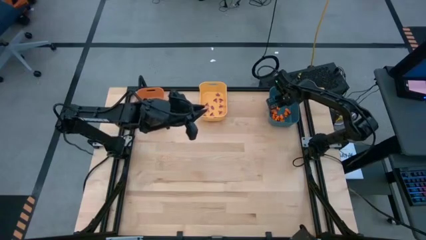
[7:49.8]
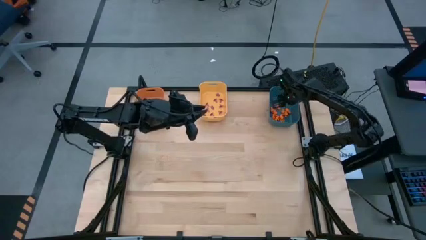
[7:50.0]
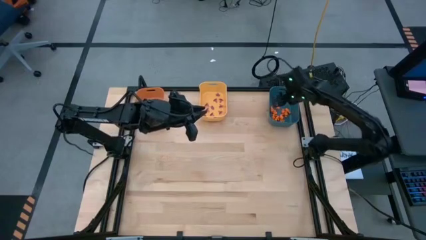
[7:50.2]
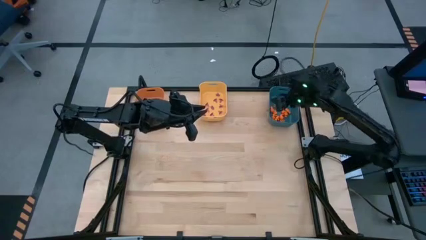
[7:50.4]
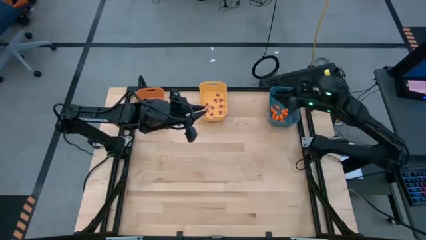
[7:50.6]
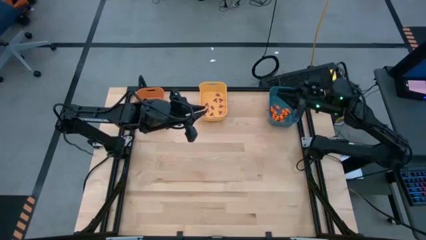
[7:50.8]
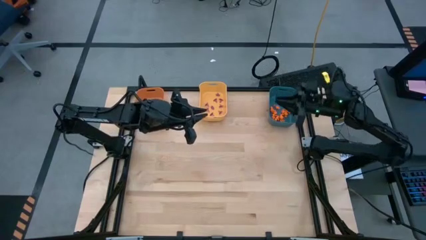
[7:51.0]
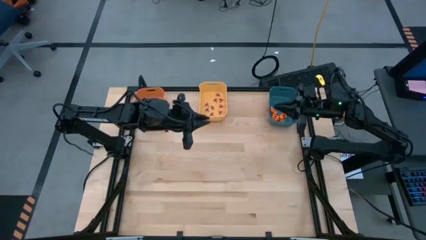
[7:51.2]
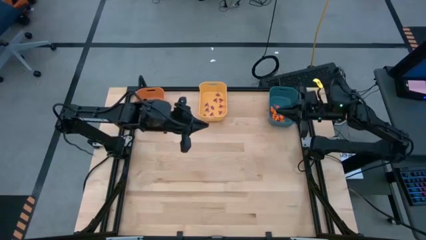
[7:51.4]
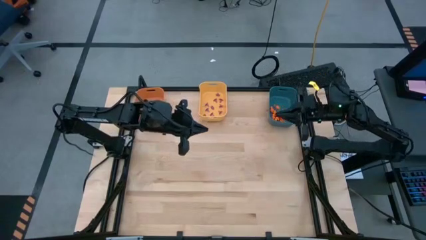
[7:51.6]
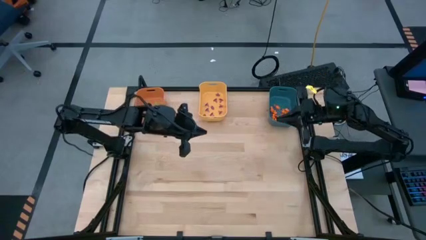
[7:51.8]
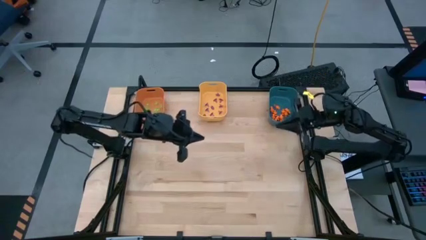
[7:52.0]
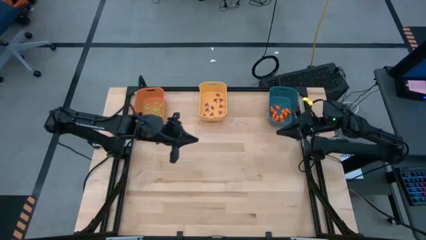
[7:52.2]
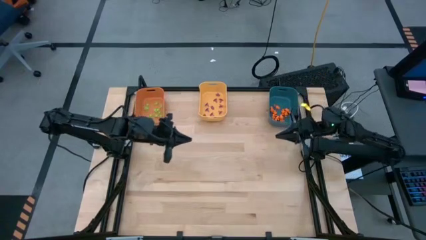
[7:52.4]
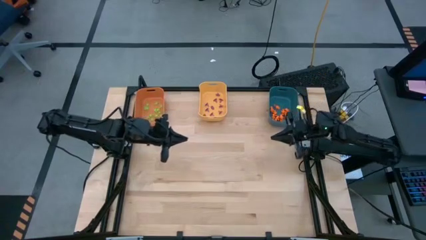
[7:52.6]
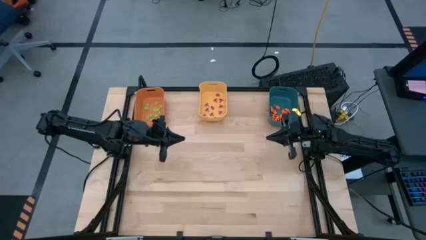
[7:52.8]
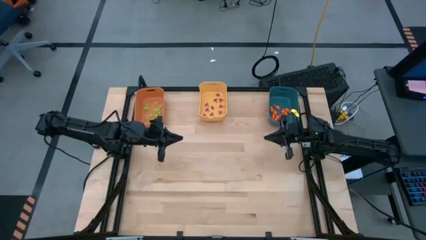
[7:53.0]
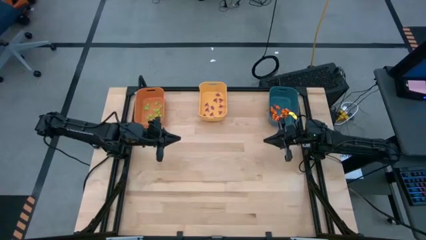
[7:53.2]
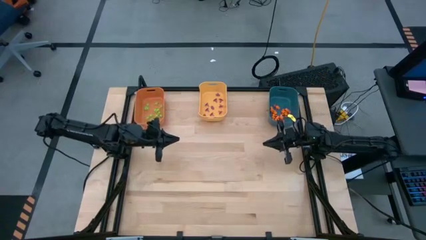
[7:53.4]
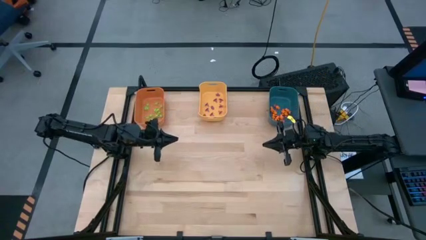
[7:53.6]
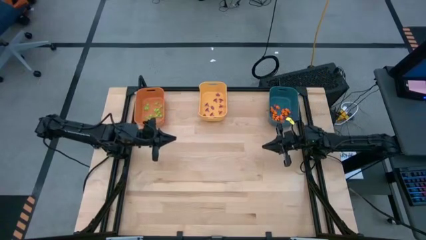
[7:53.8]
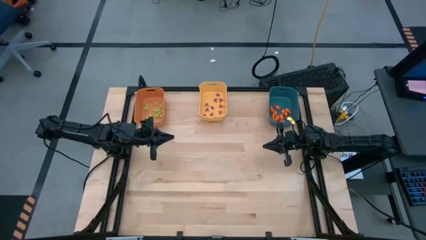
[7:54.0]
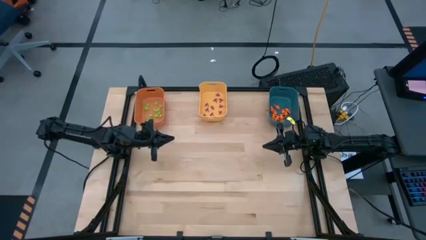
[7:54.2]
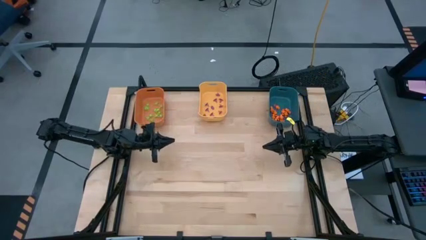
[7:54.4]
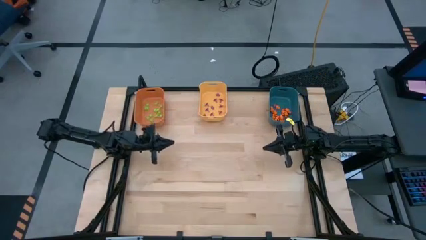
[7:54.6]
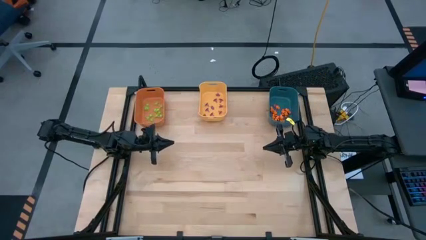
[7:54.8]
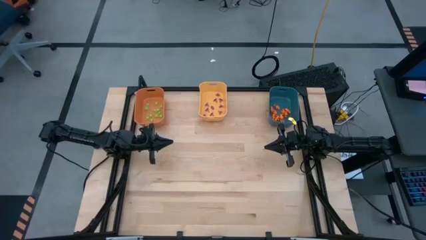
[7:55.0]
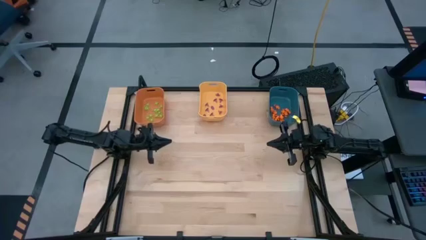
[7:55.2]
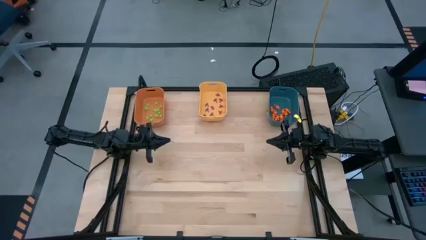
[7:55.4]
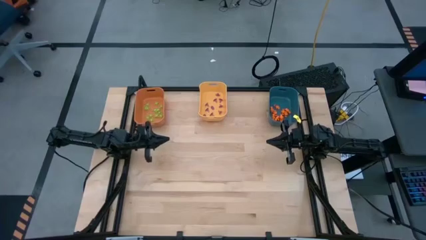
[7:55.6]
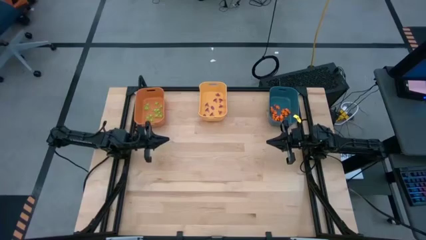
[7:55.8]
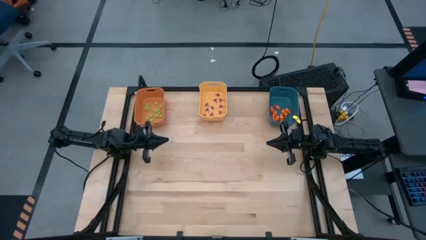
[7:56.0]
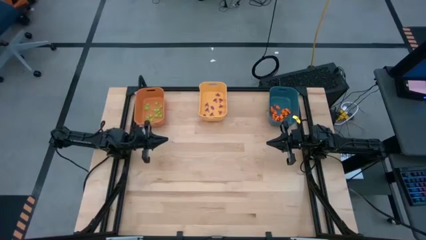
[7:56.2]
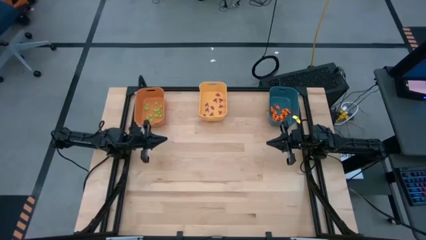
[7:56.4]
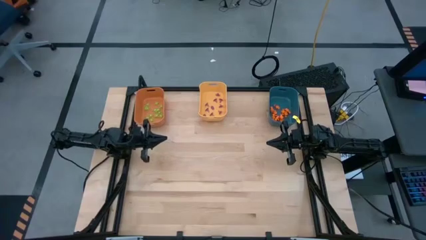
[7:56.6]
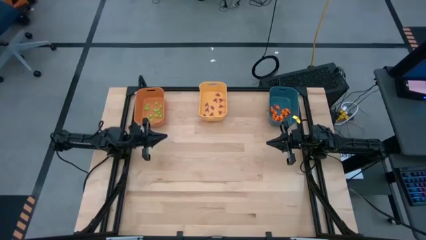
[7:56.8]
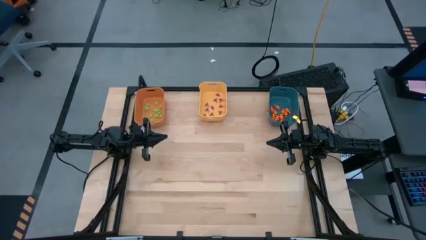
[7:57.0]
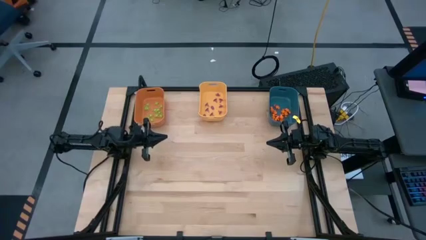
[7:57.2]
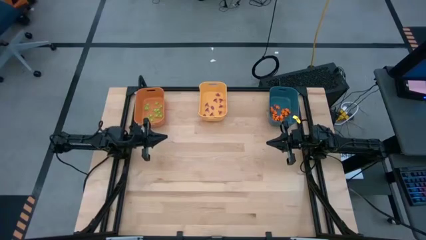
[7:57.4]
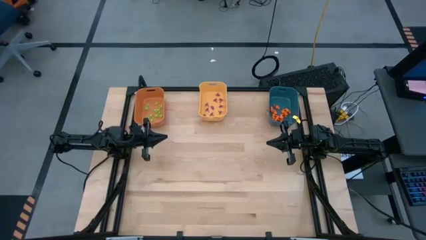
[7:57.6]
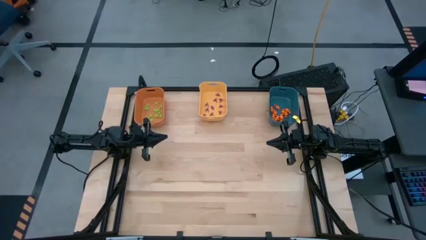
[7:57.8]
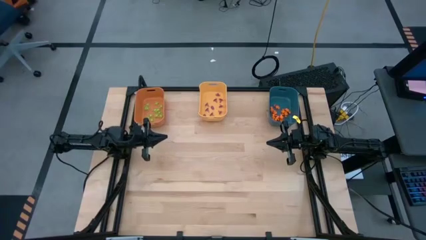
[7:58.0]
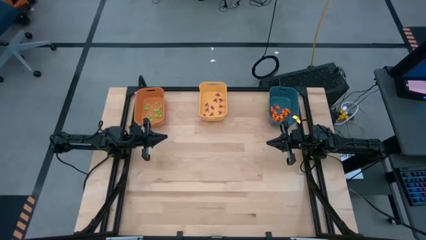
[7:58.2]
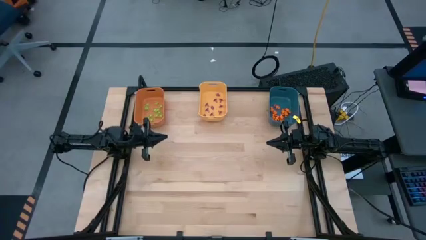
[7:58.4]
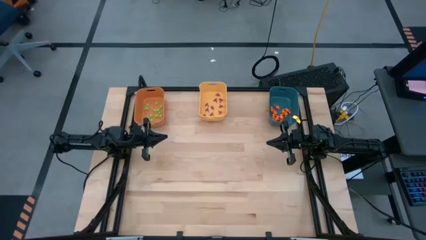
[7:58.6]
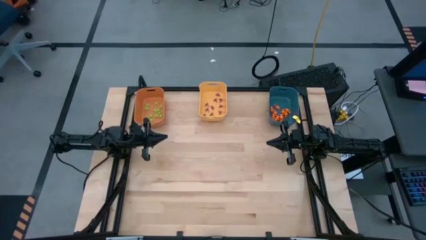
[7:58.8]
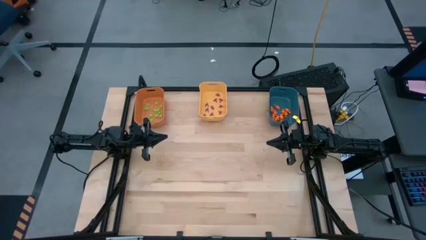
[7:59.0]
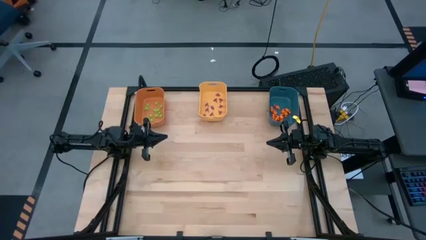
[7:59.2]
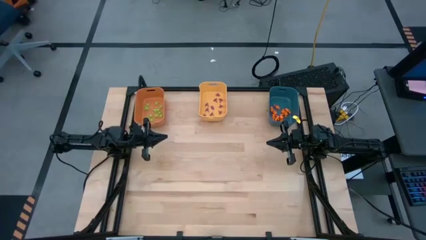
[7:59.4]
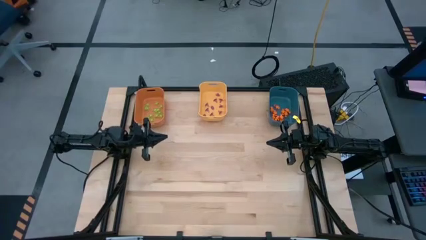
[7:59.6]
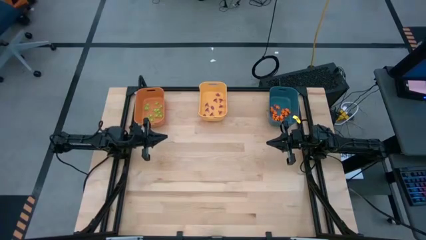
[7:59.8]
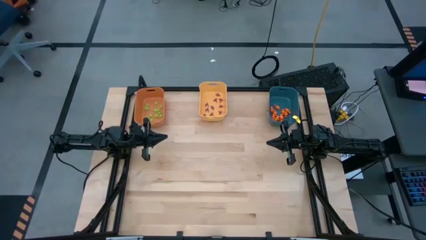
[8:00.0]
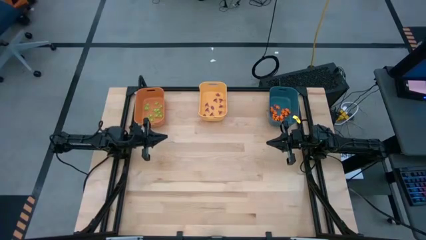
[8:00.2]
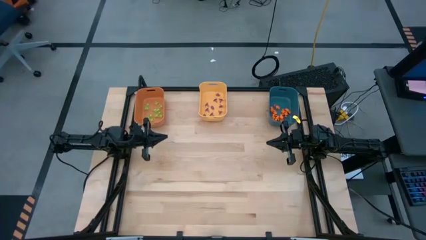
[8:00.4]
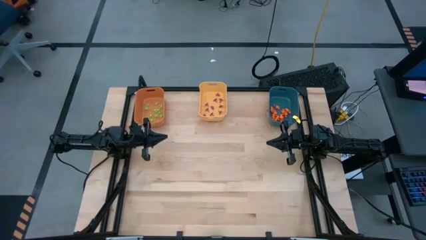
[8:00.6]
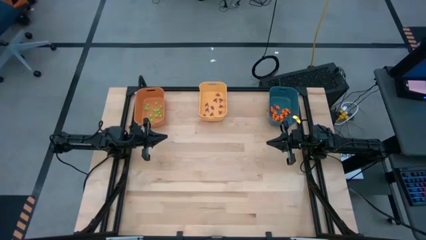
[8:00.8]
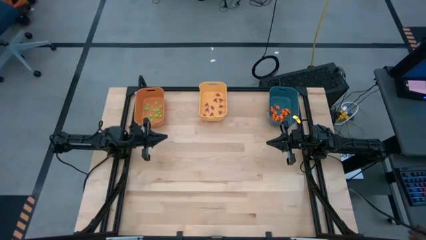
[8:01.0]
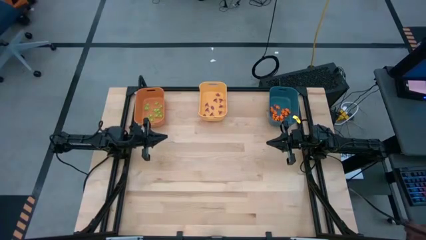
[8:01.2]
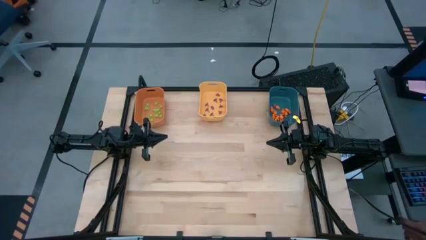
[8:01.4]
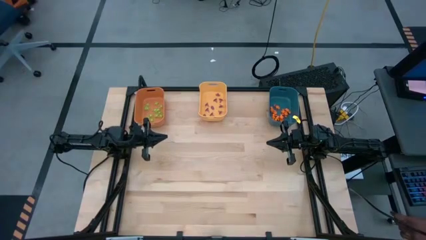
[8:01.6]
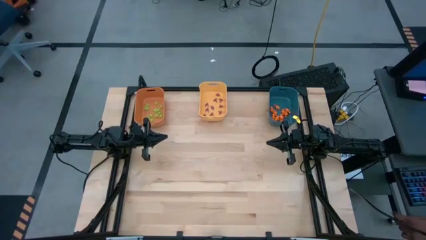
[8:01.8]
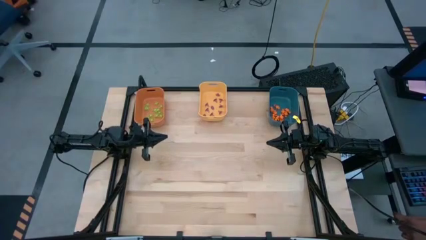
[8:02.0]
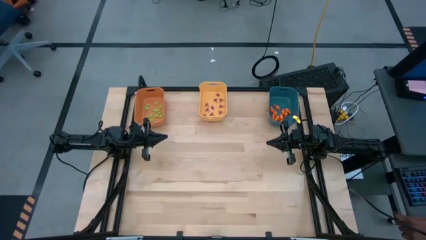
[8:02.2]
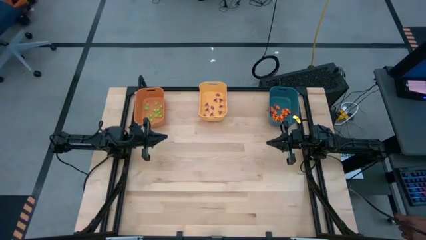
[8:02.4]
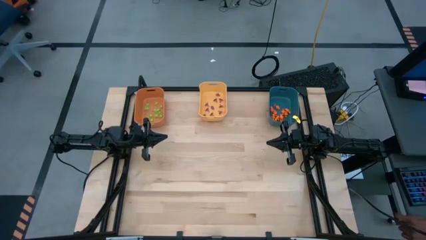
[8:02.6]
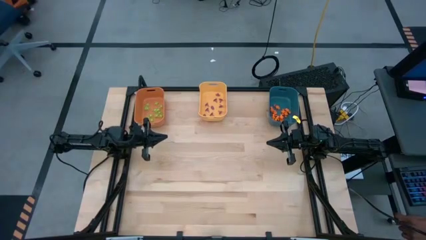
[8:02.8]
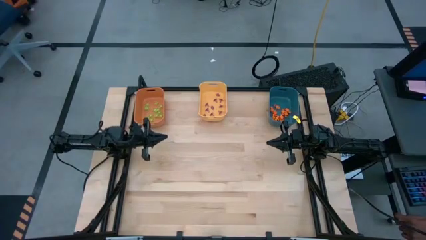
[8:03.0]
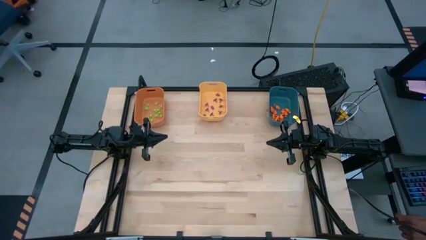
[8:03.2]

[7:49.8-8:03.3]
Task: Sort Halloween decoration
Return to Home Position

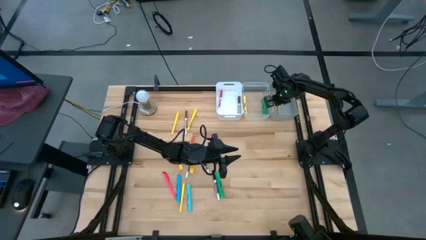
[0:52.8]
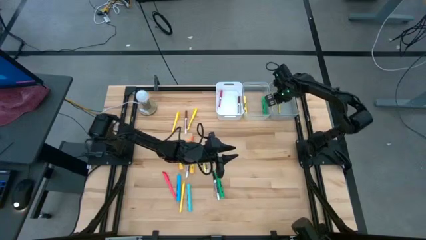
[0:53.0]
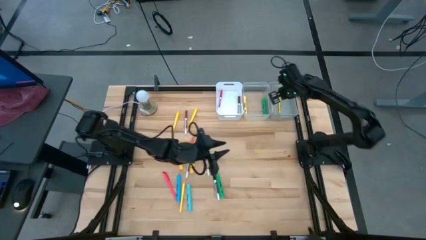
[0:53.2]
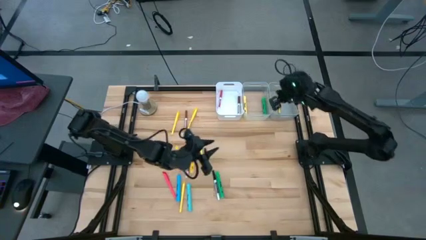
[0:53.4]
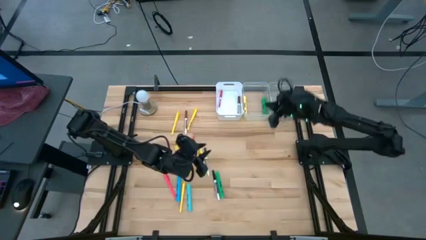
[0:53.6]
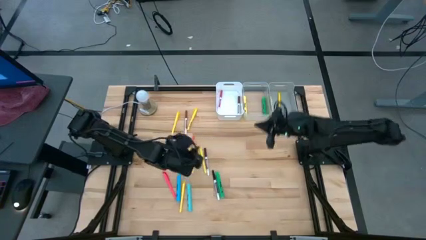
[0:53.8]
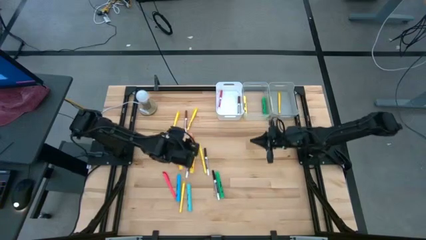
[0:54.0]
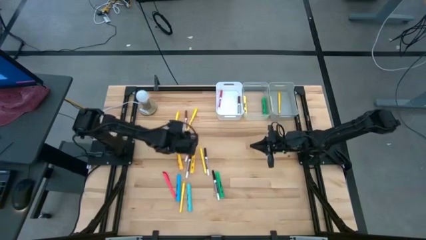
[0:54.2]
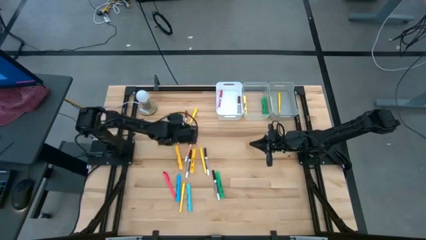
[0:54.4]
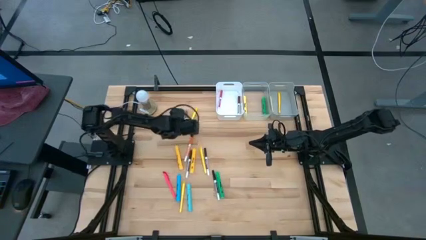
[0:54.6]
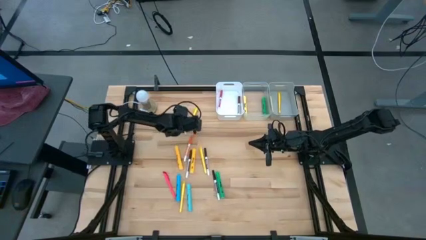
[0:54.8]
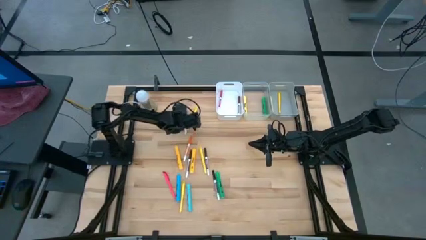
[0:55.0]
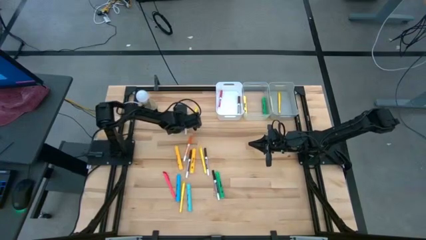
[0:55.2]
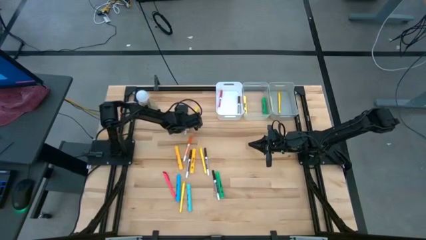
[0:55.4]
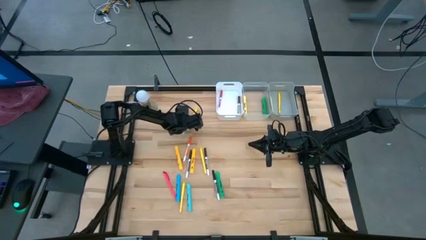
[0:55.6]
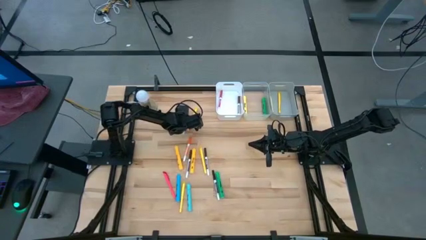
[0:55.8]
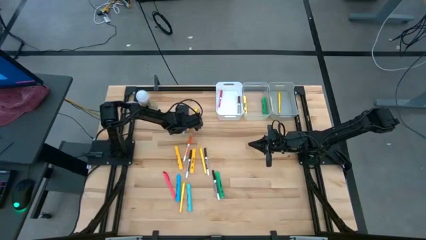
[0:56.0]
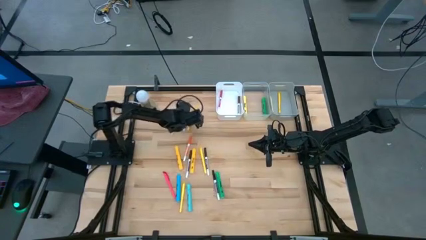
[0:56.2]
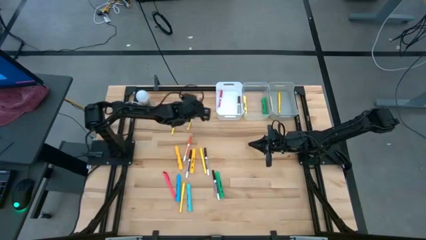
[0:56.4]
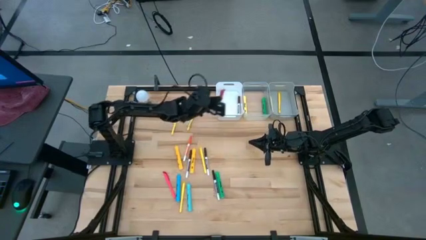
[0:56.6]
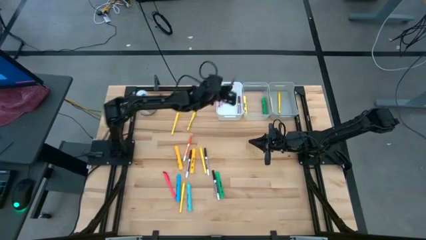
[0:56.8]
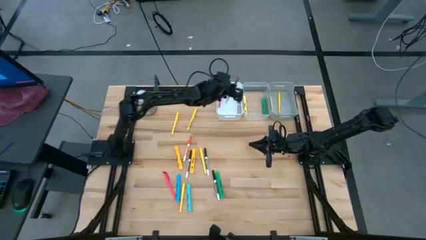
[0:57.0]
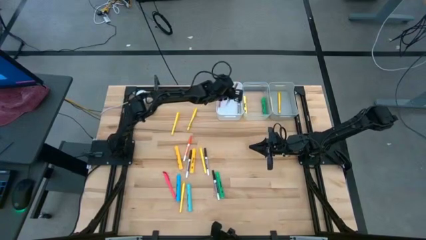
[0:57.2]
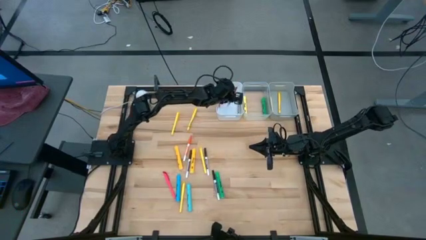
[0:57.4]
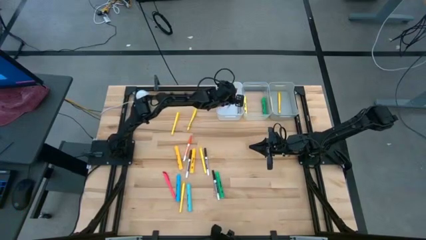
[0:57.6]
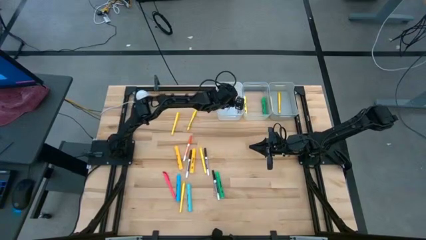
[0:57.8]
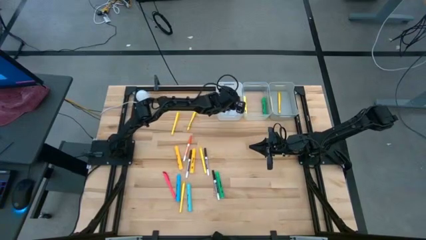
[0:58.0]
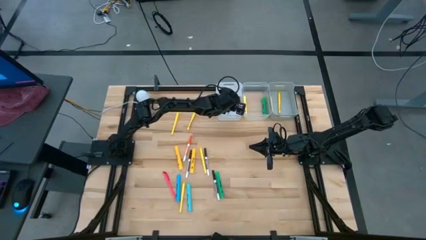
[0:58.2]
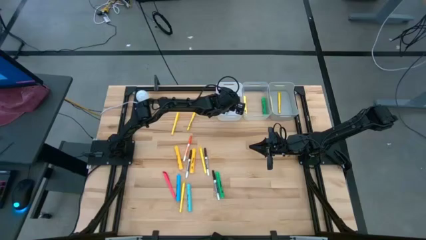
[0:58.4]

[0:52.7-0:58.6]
Task: Pick & Place Markers
Put the light brown marker pen into the white bin
